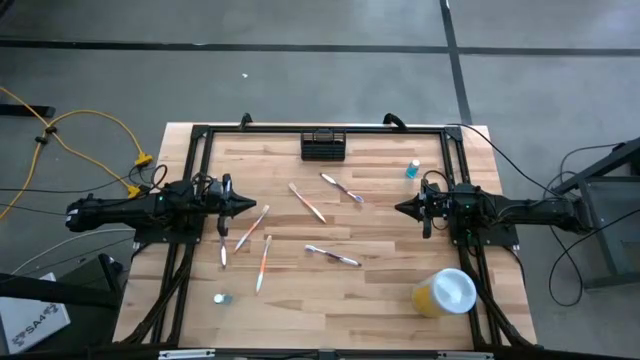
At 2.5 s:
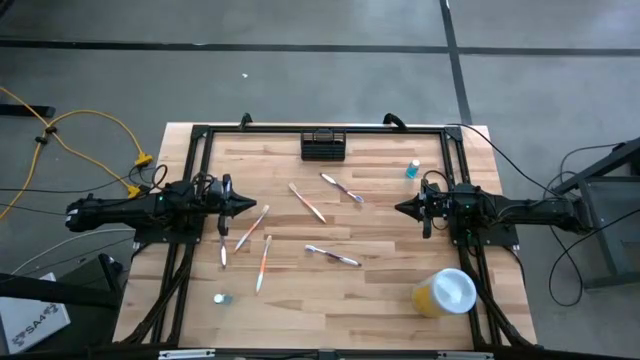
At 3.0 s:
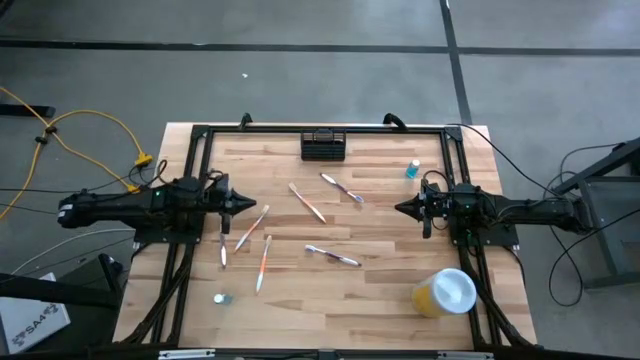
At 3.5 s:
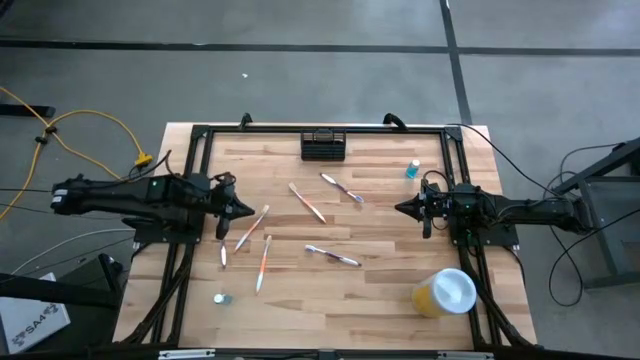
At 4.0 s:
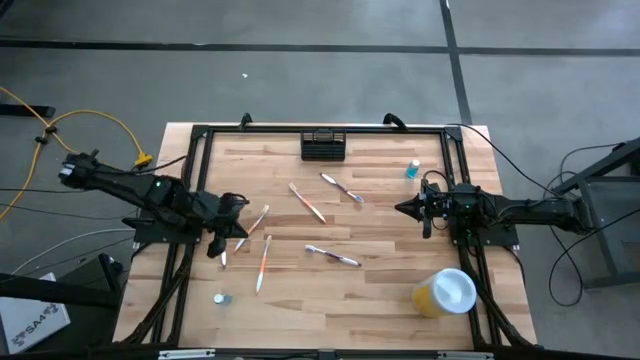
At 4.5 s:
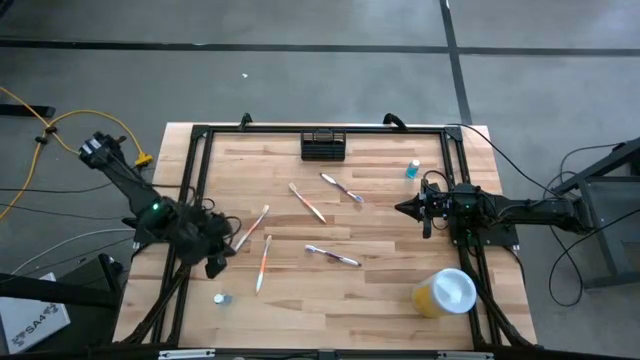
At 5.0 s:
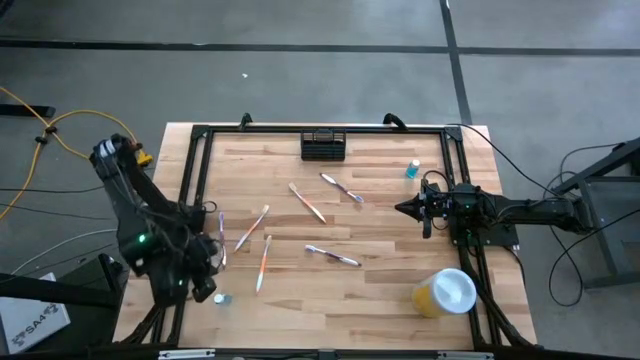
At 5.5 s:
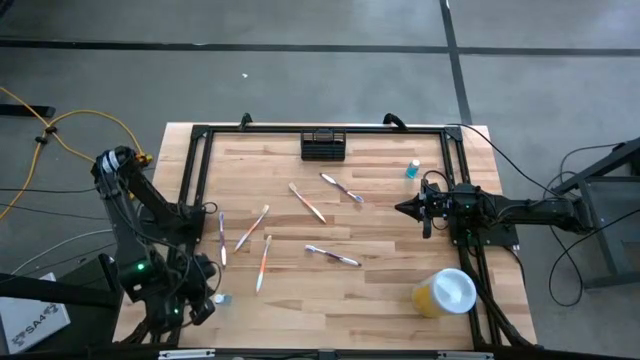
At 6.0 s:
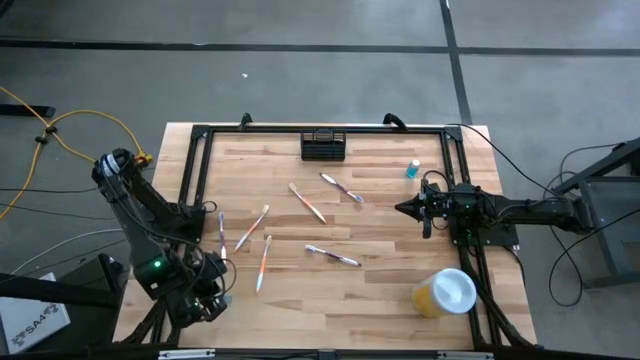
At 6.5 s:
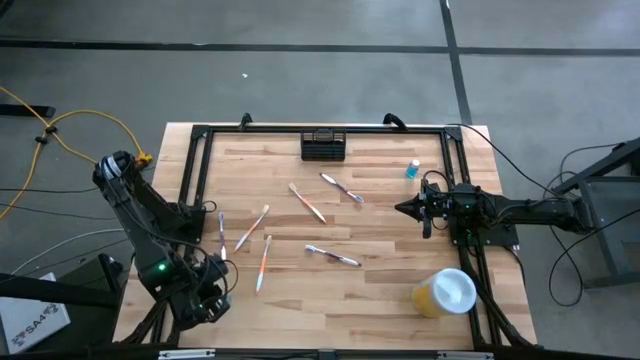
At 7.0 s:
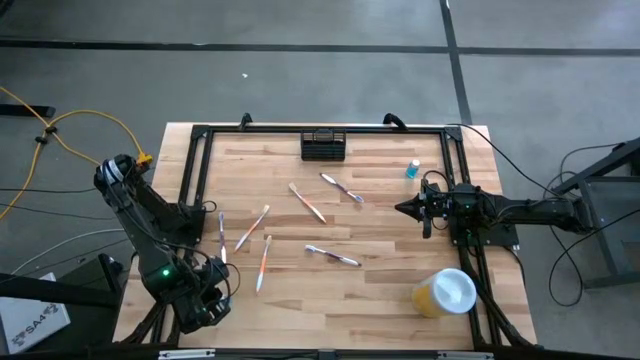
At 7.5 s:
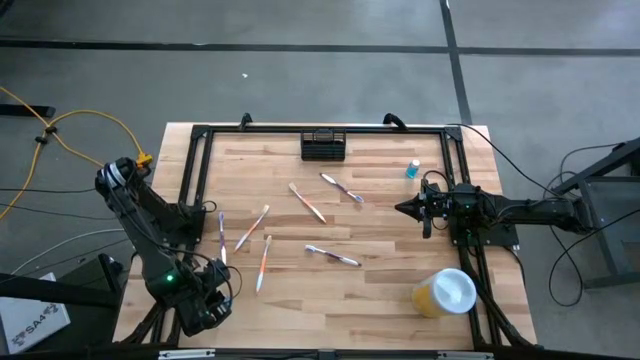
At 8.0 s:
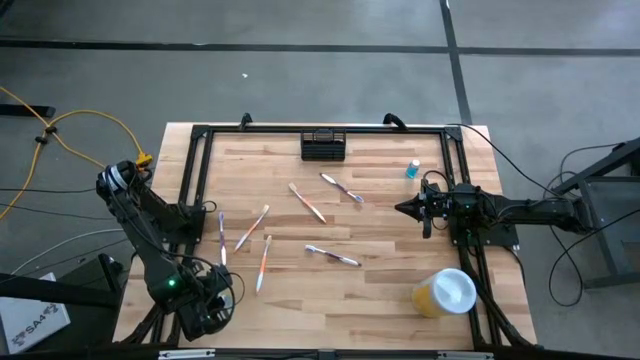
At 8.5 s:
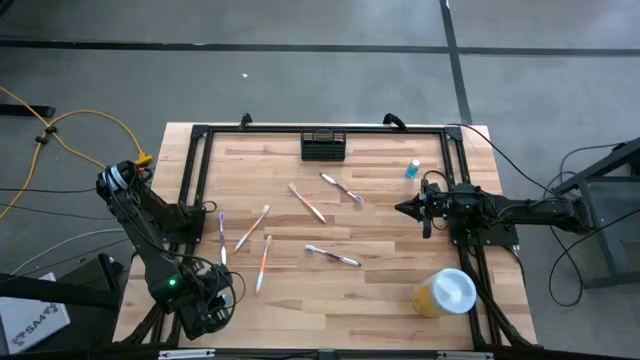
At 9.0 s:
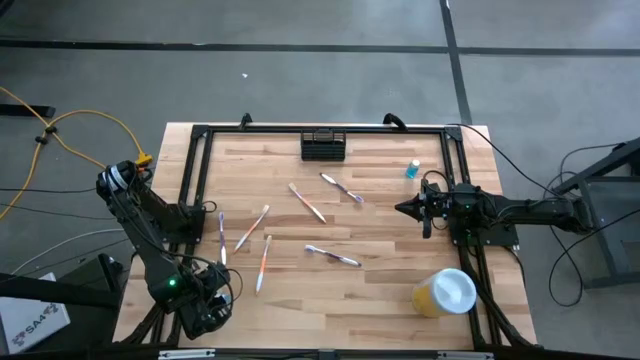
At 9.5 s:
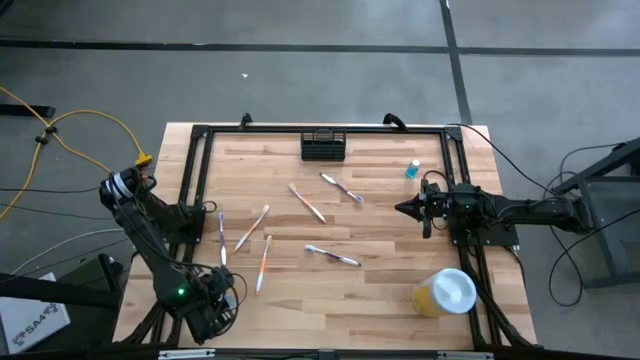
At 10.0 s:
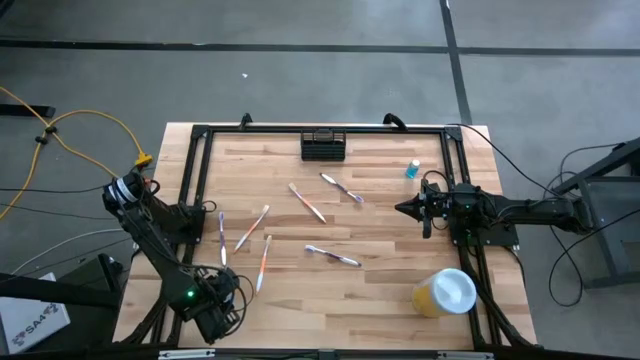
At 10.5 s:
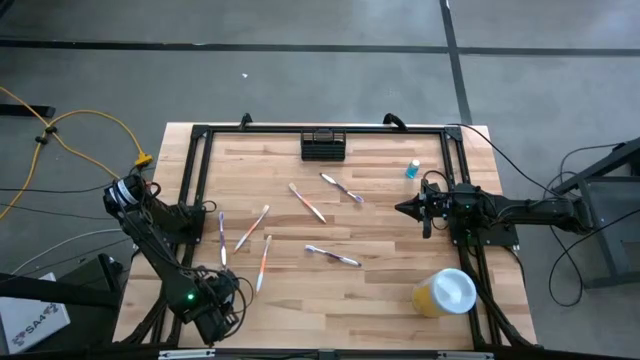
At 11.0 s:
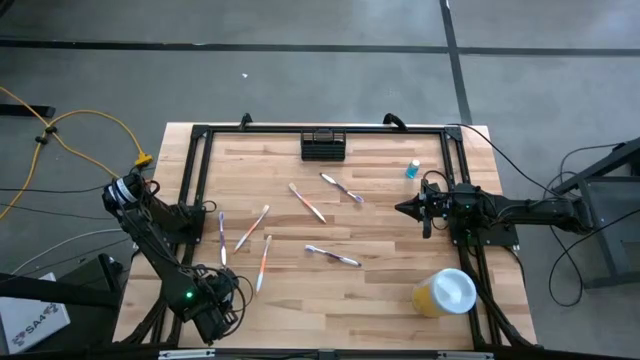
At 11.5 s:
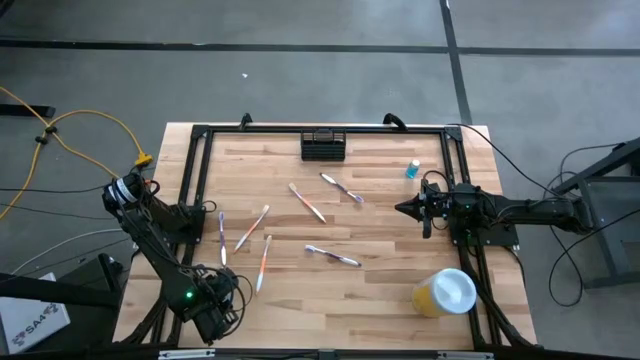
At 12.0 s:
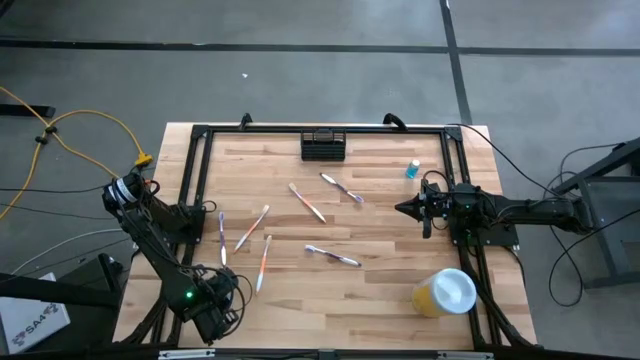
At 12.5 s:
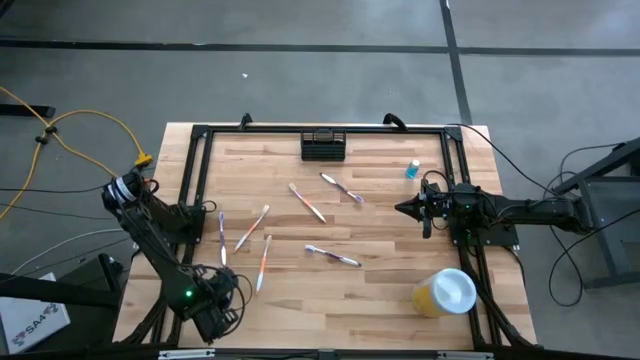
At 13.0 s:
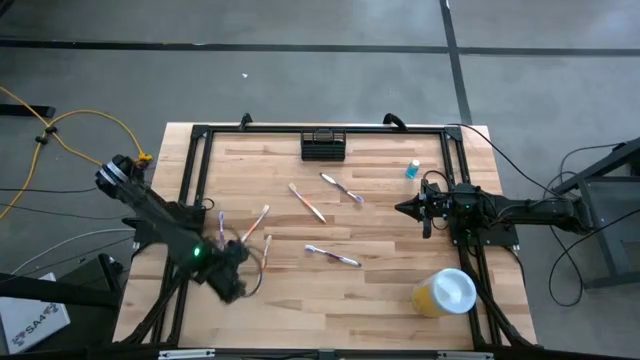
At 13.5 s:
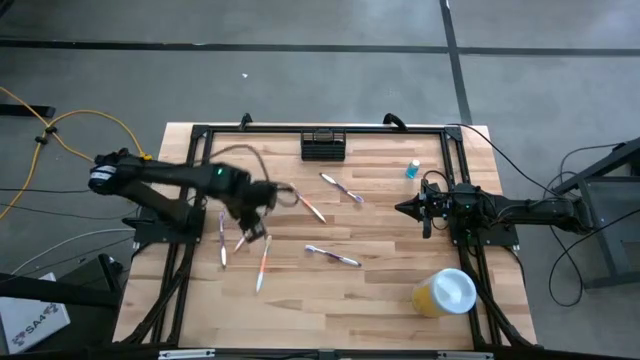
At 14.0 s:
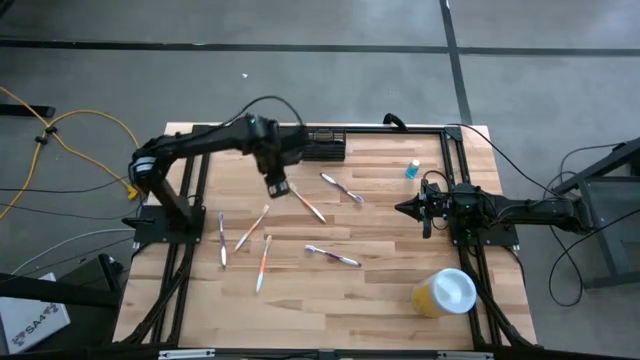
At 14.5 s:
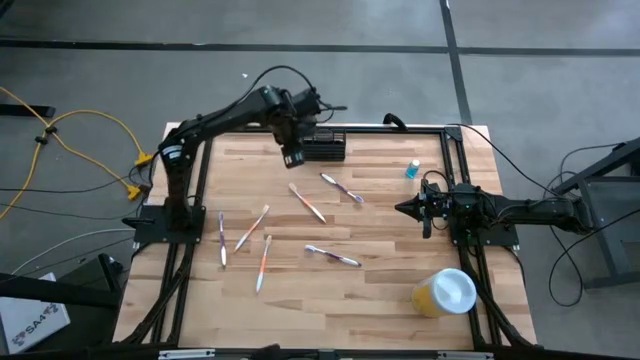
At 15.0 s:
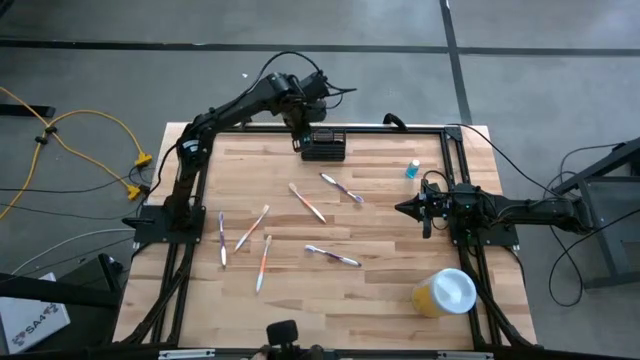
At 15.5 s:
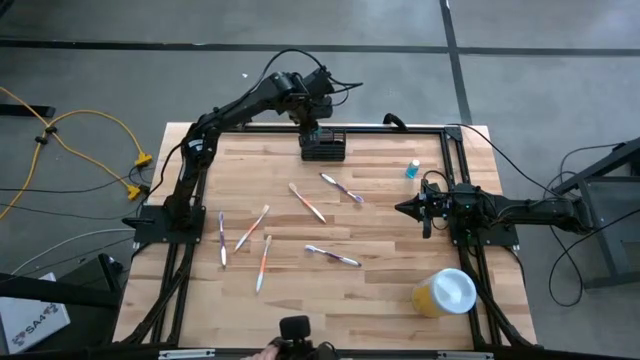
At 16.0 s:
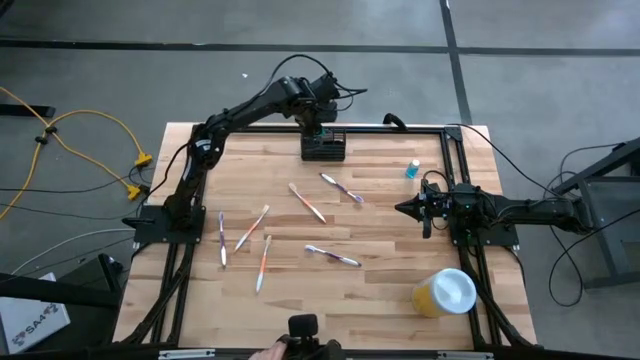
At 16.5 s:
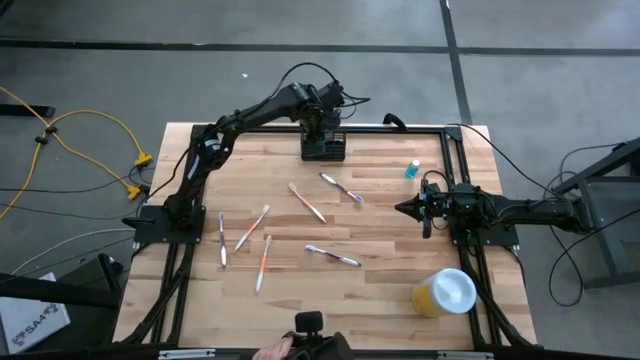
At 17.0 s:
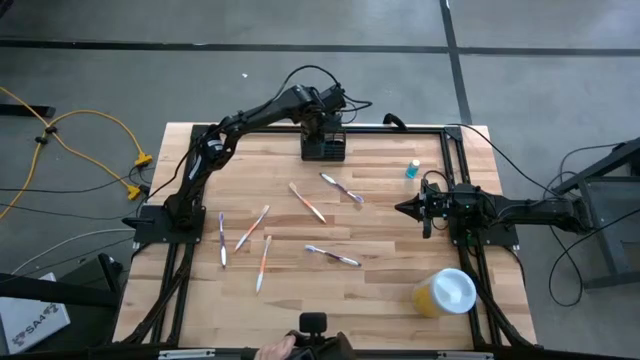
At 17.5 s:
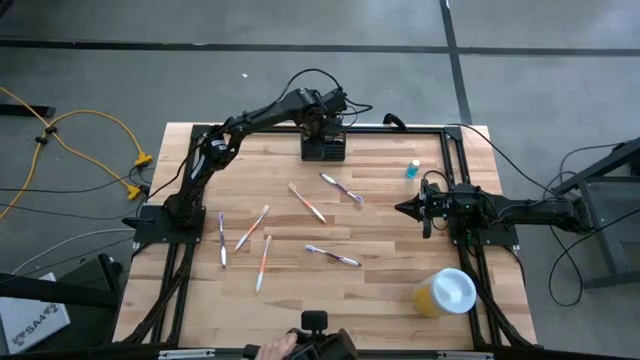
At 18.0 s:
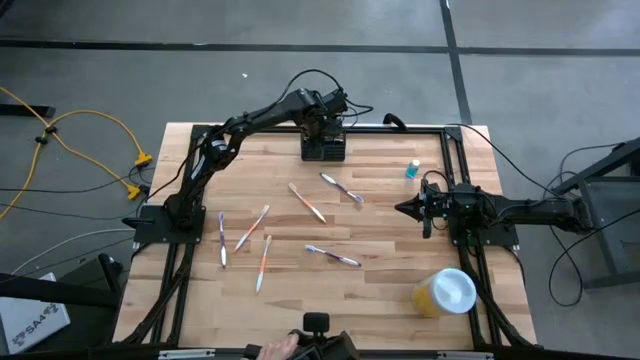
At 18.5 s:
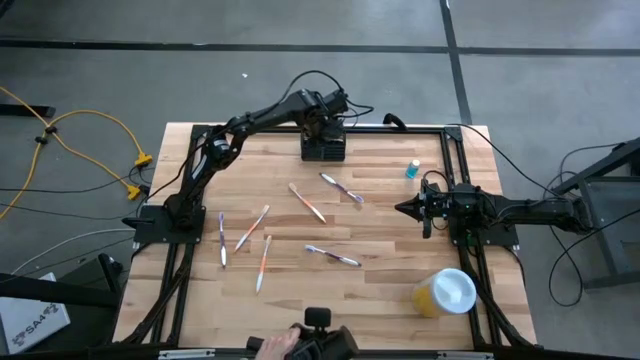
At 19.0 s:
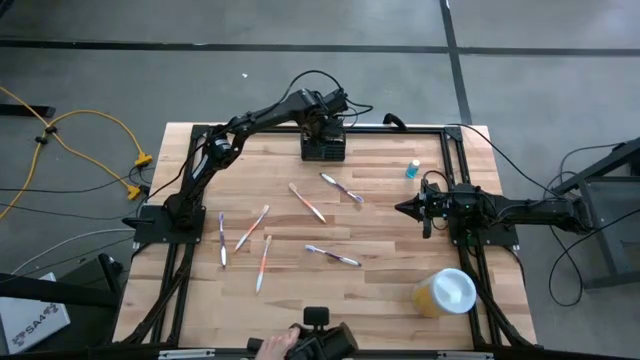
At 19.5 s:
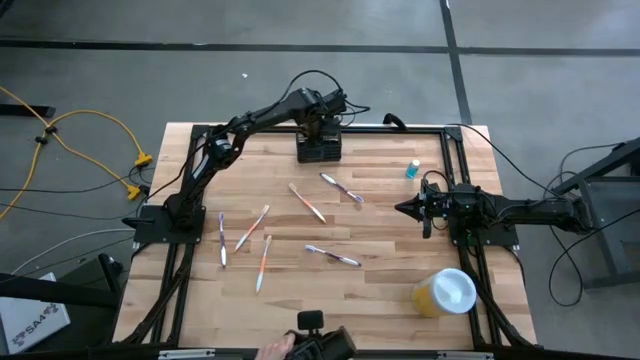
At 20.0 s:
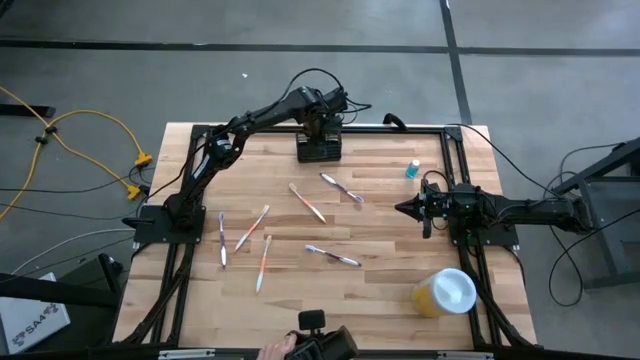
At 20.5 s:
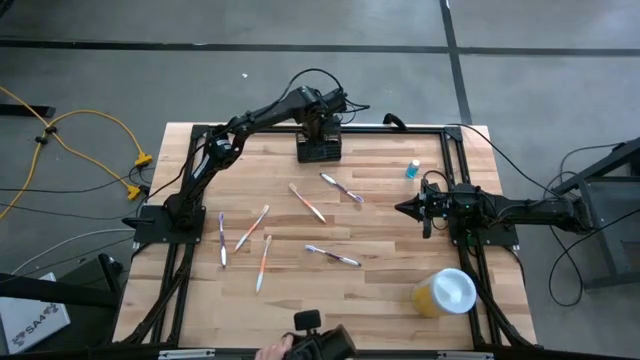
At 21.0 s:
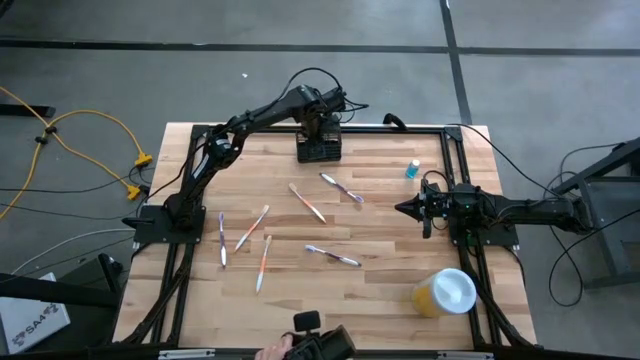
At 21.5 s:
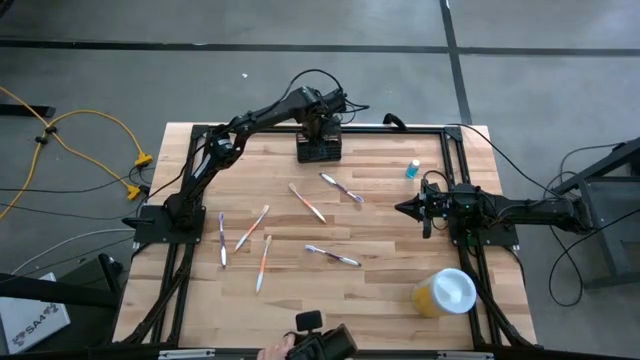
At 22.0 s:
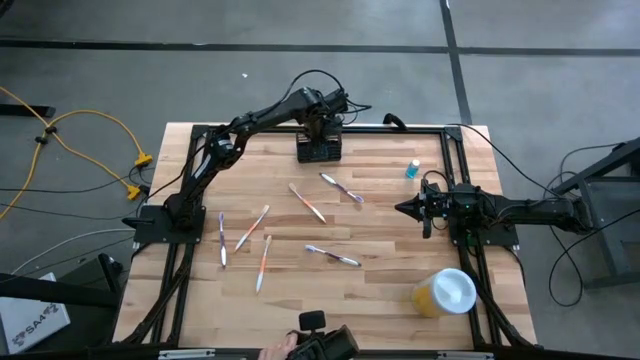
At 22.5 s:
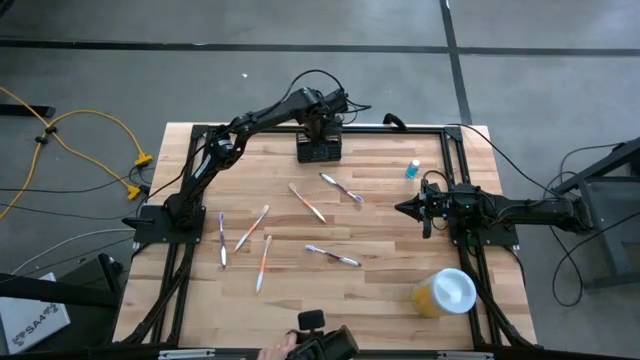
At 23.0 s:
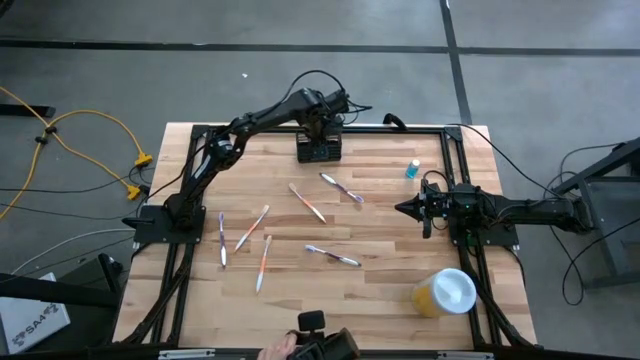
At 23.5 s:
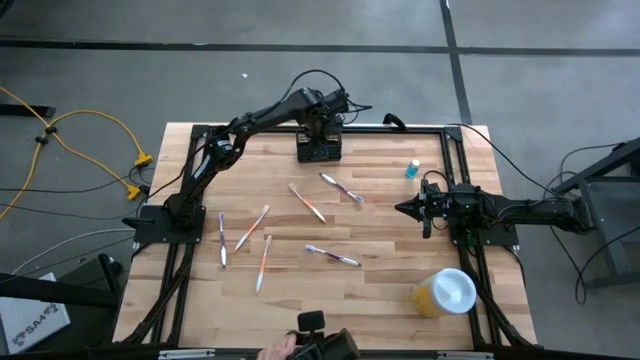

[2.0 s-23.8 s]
Task: Pick & Place toothbrushing station
Put the bottom blue mouthwash into the wire organizer
